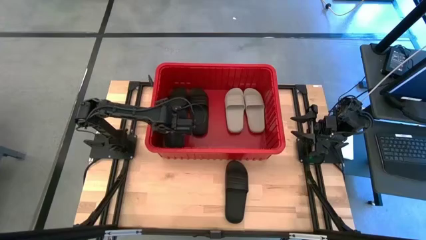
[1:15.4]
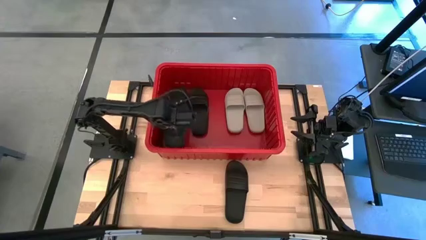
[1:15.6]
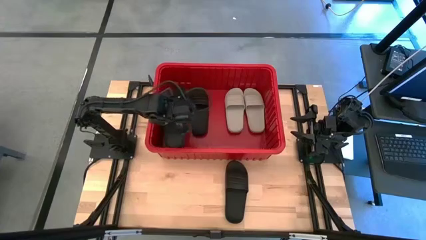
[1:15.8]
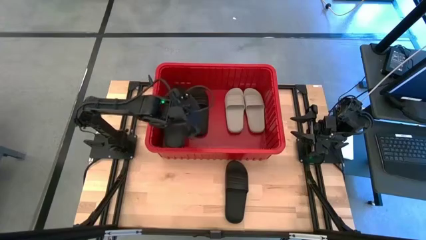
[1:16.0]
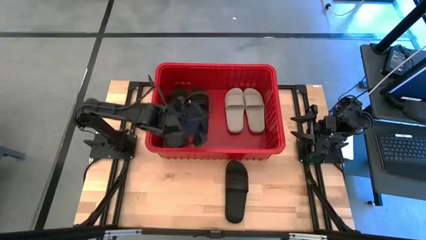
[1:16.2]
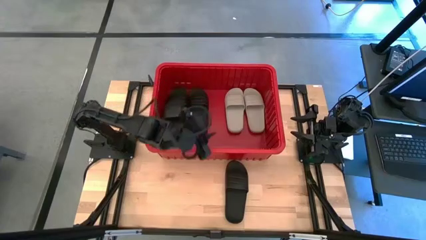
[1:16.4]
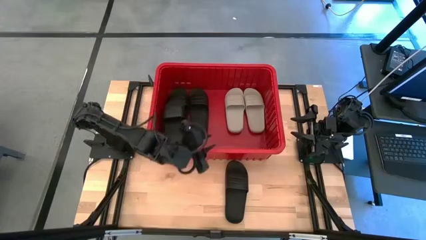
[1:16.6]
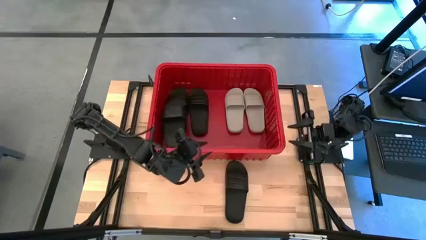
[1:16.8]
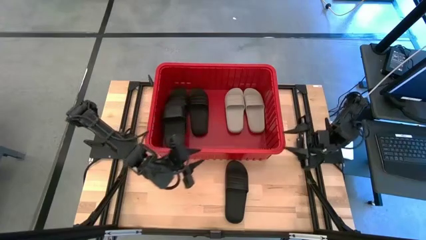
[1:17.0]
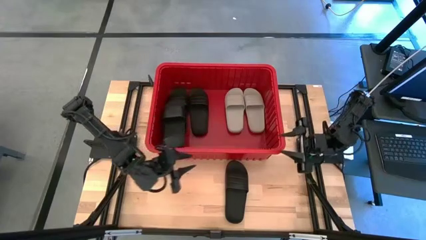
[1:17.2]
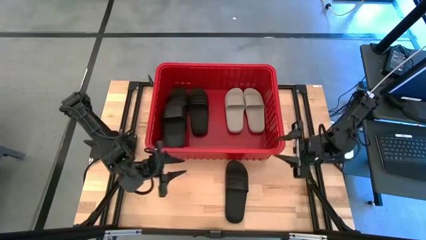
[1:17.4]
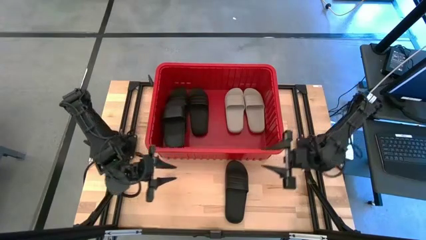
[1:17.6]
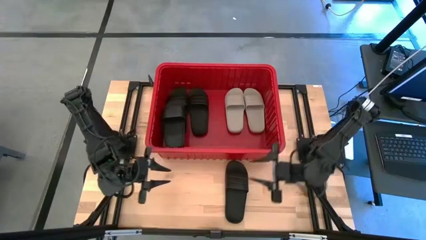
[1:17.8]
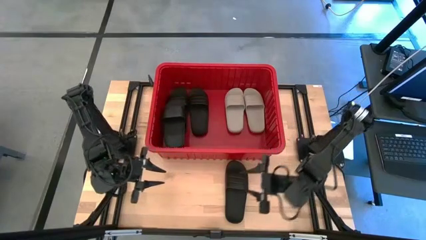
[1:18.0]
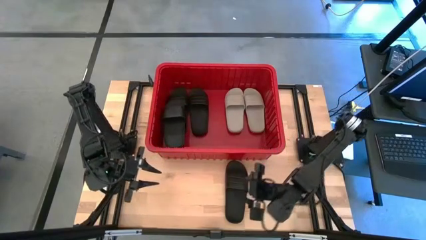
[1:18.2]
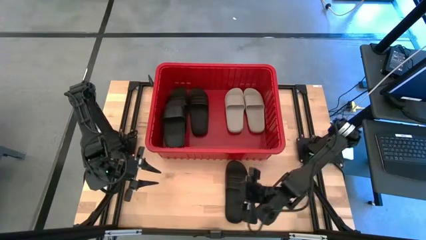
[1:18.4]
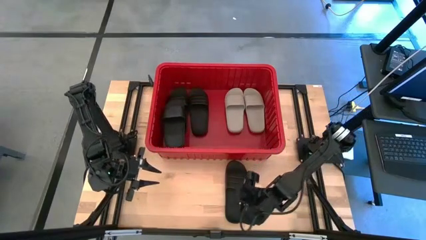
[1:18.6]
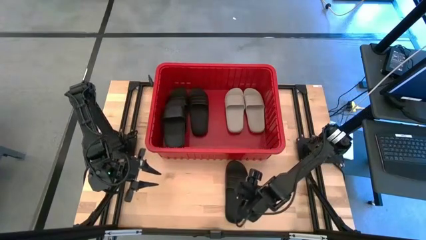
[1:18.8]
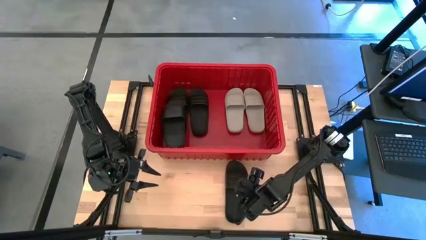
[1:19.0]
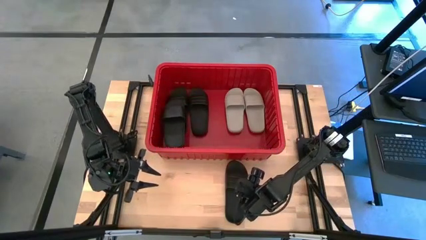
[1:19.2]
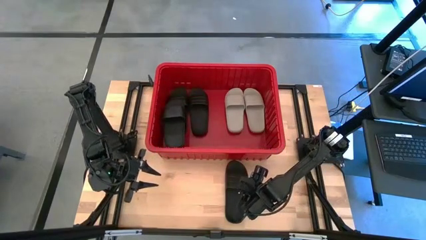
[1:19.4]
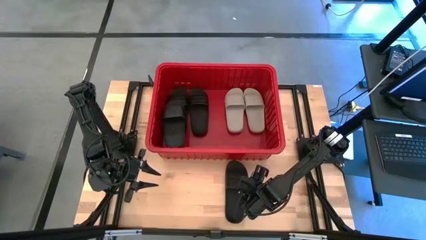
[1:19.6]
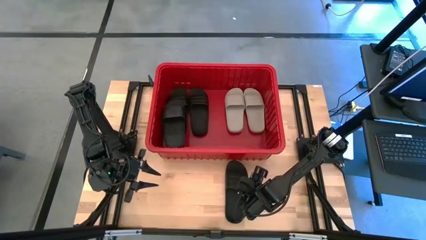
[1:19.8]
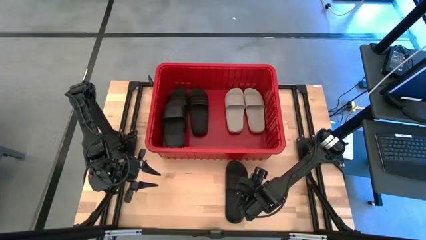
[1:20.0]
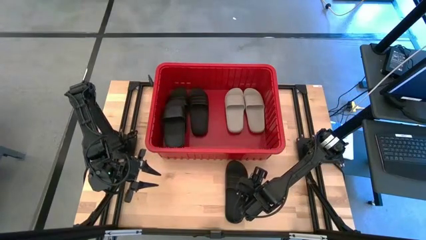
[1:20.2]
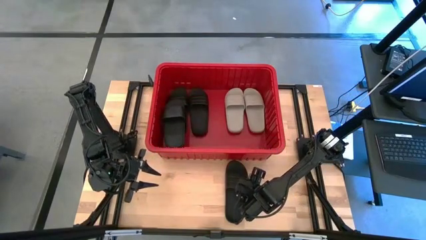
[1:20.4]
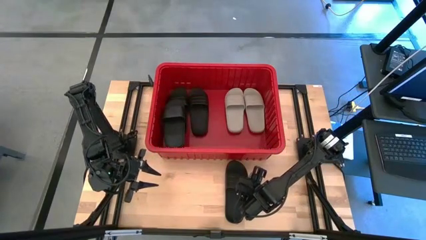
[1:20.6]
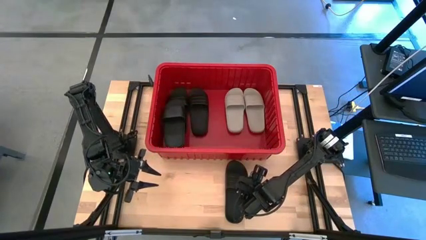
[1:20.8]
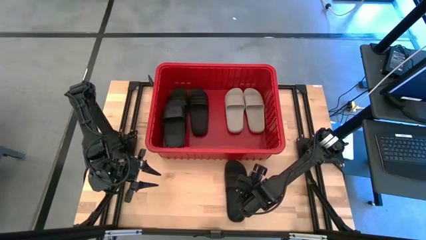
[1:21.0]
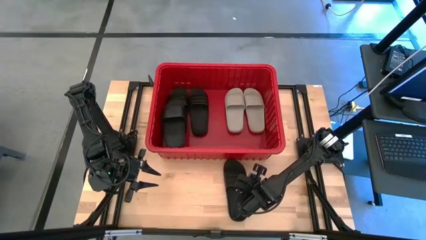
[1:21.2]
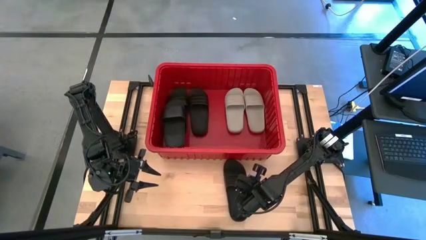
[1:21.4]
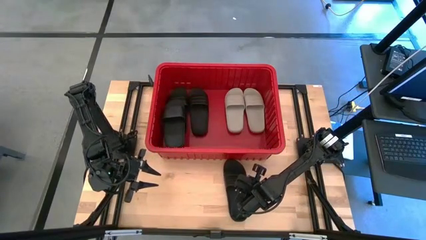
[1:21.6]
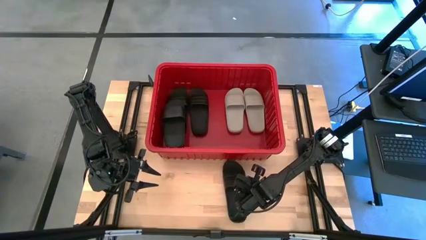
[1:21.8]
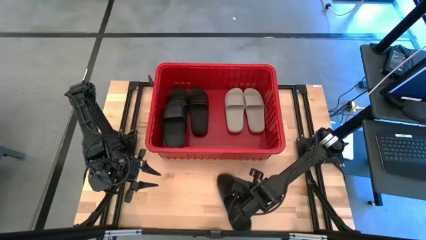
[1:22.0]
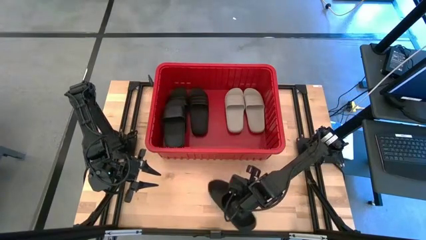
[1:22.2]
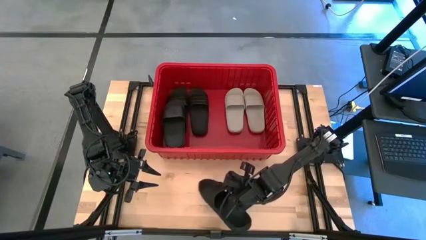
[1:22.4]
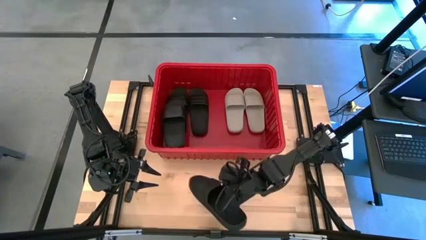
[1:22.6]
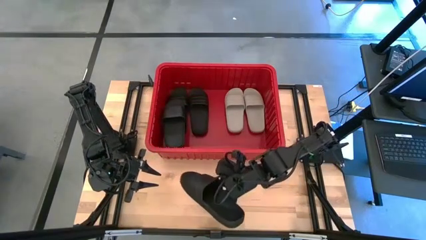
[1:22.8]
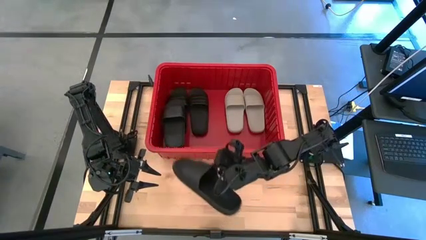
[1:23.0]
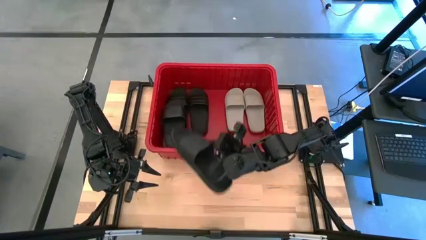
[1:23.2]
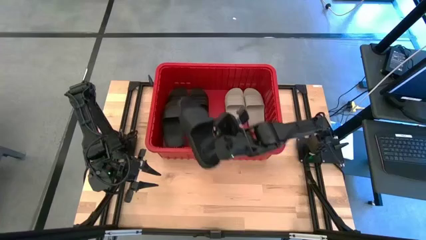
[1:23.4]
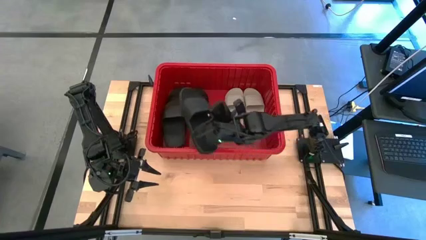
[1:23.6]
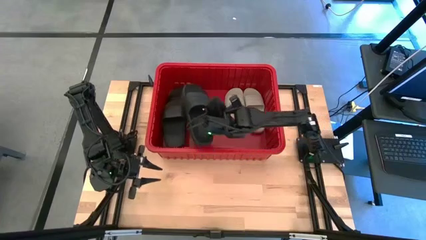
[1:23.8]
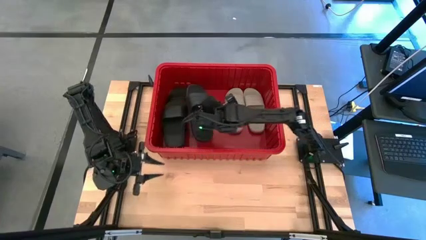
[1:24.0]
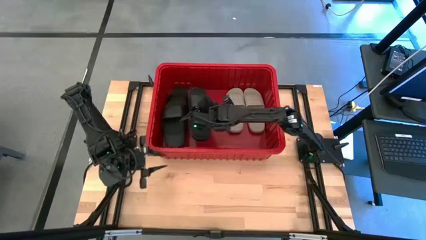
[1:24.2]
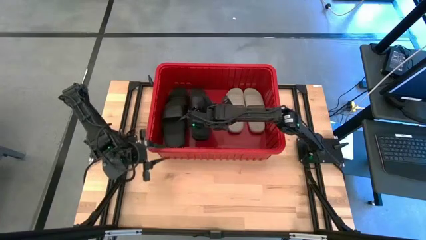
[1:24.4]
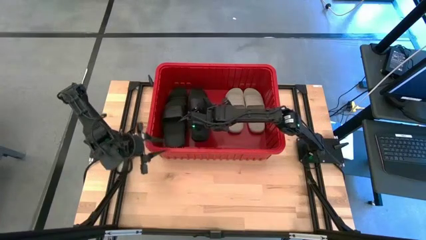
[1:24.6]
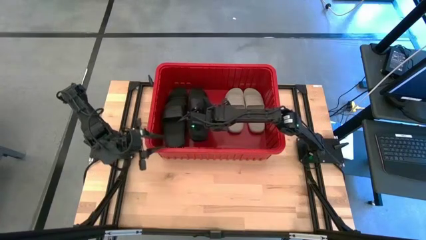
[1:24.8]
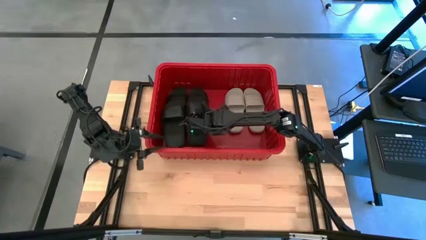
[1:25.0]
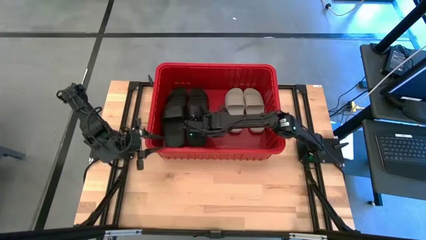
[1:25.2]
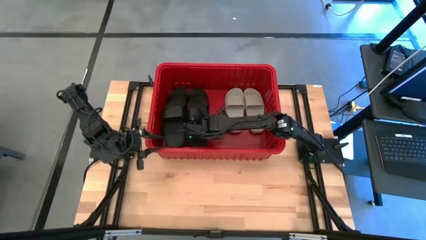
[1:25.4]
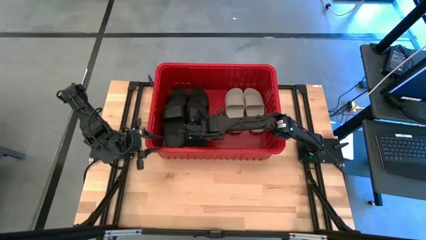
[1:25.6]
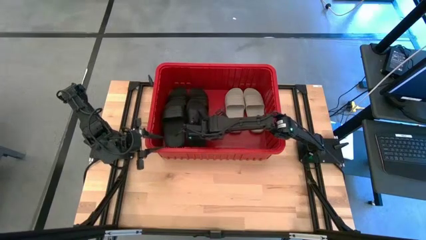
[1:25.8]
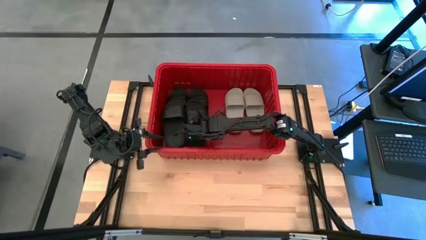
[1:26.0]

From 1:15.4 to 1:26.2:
Task: Pick and place slides into bin
Put the black slide into the red bin

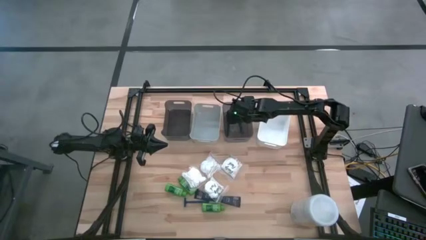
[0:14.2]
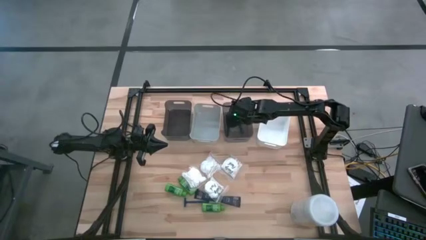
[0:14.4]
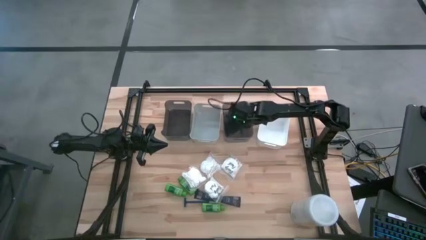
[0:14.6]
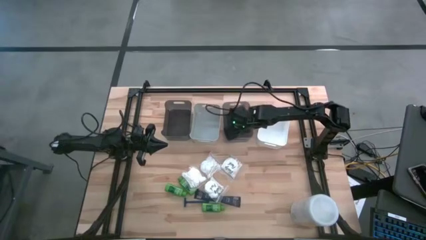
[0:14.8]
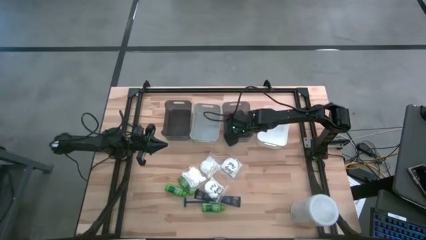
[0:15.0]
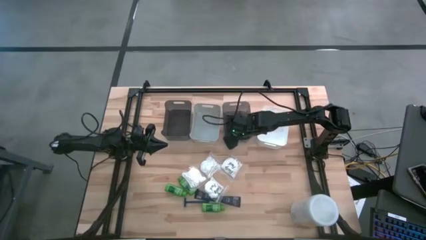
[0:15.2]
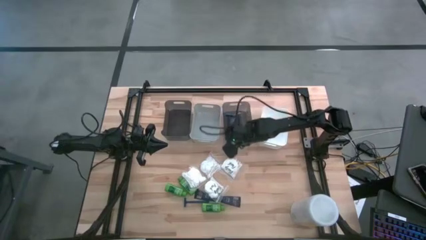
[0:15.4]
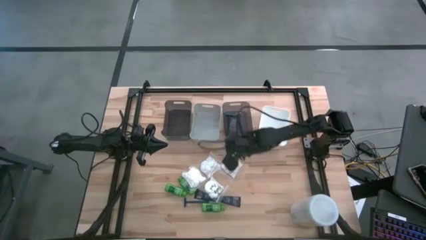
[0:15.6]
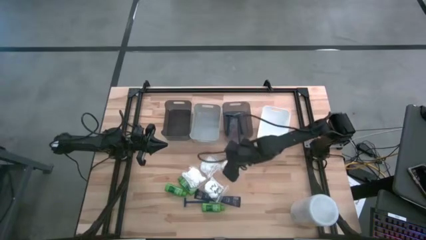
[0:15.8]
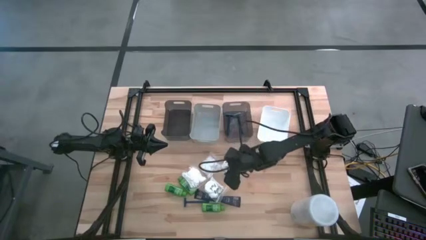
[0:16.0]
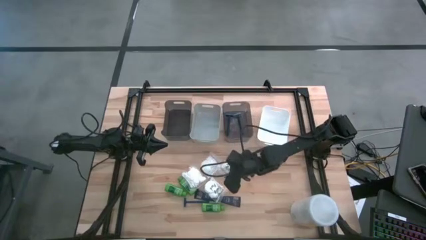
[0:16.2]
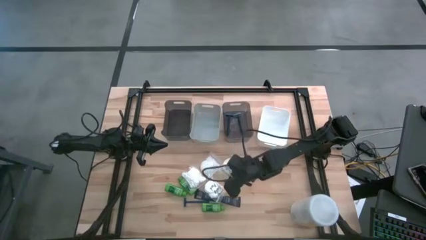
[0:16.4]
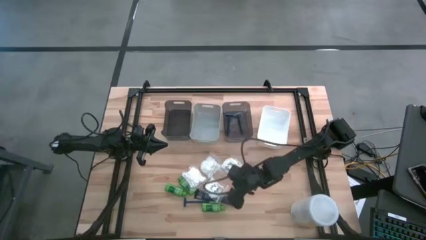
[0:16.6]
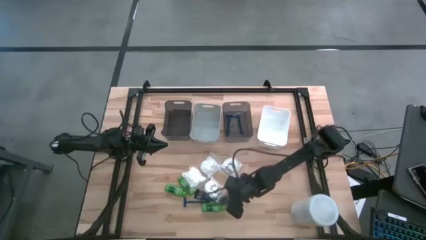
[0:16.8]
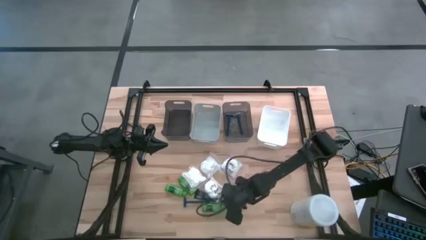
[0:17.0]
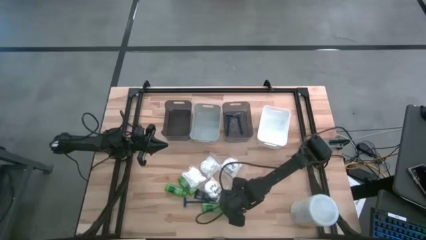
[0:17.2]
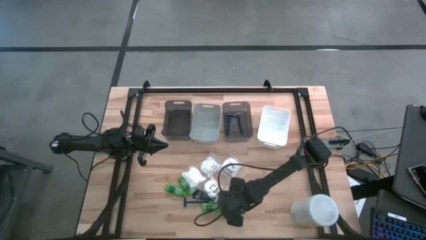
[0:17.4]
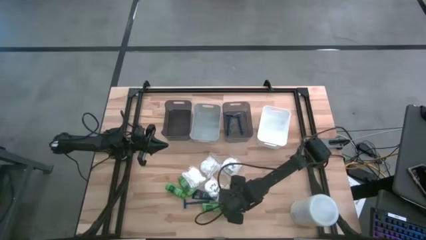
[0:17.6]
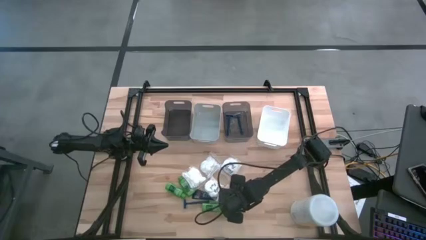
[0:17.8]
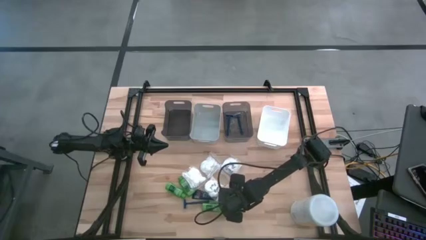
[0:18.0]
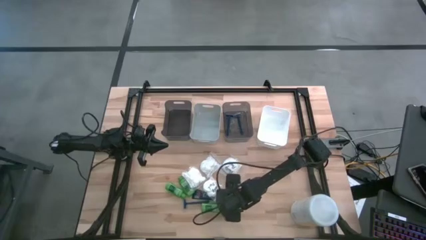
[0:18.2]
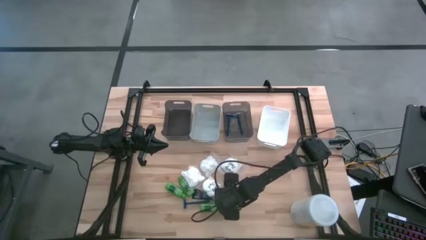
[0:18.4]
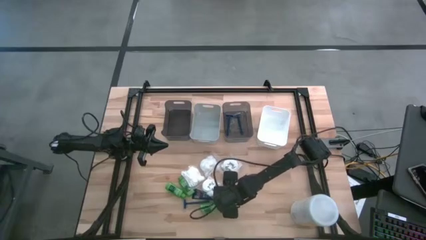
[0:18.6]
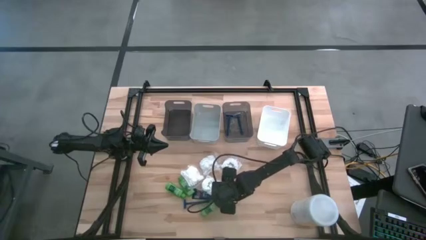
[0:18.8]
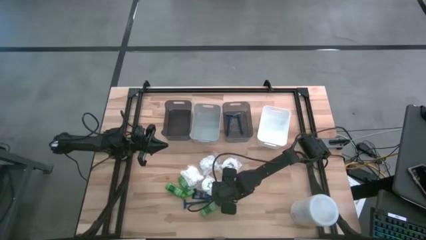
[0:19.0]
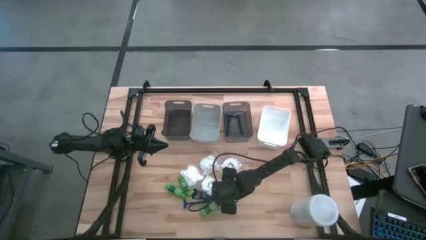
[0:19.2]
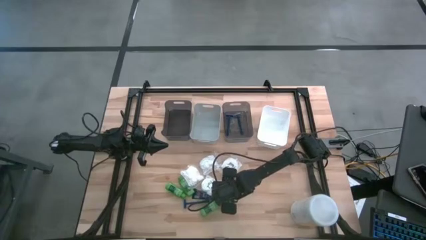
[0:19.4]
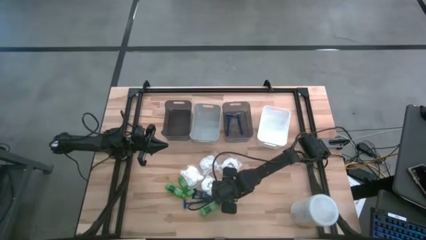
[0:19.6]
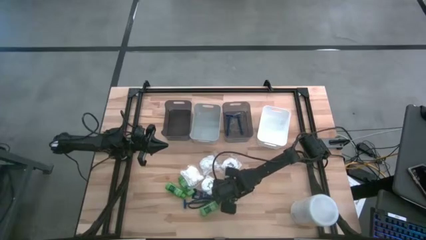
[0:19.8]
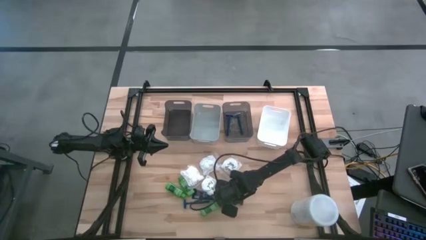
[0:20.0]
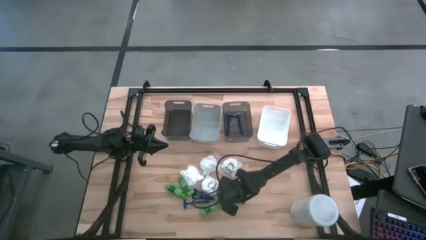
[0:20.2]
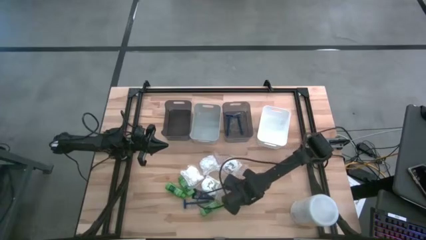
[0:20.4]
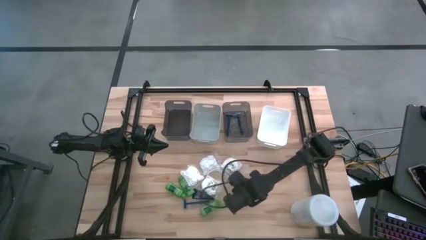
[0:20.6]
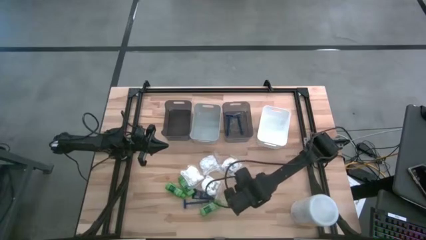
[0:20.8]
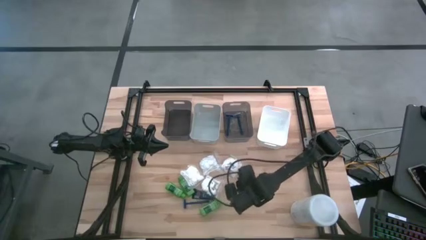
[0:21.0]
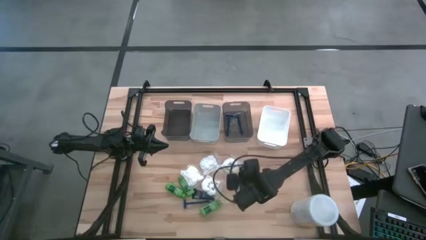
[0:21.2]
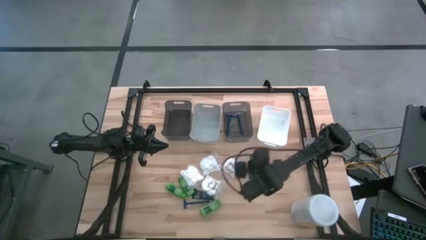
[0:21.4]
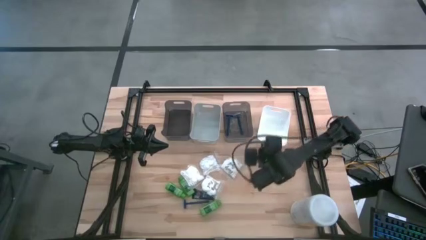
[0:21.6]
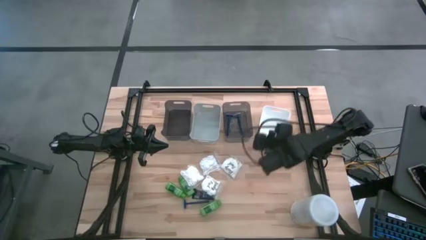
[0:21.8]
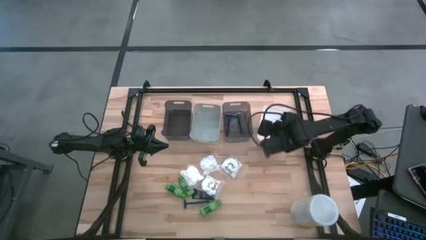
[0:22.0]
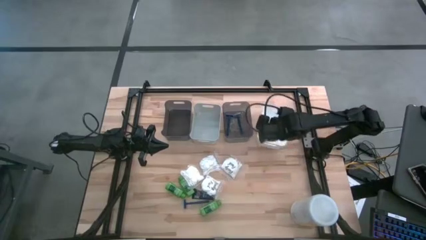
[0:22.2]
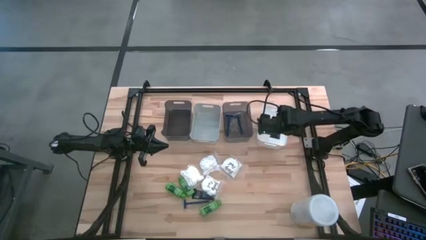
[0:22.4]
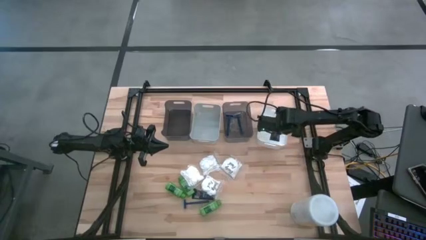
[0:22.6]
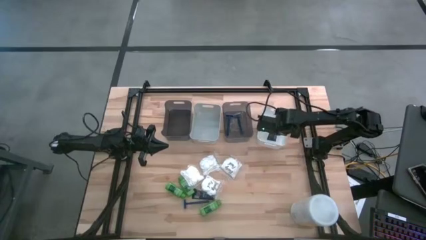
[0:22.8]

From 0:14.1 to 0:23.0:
Task: Pick & Place Travel size toiletries
Put the blue shaving cream into the white bin
